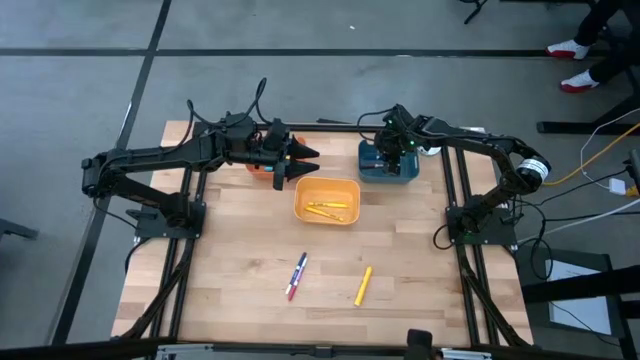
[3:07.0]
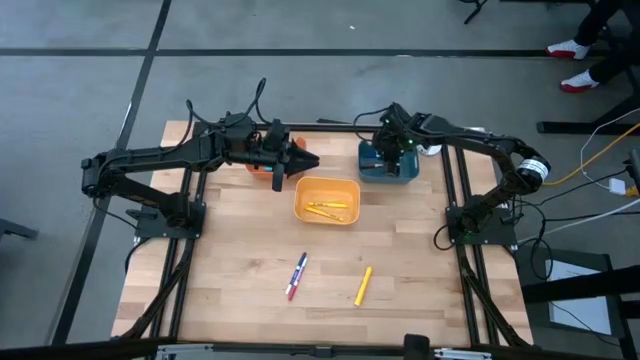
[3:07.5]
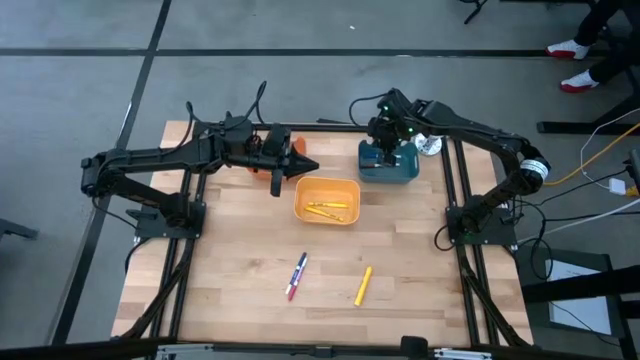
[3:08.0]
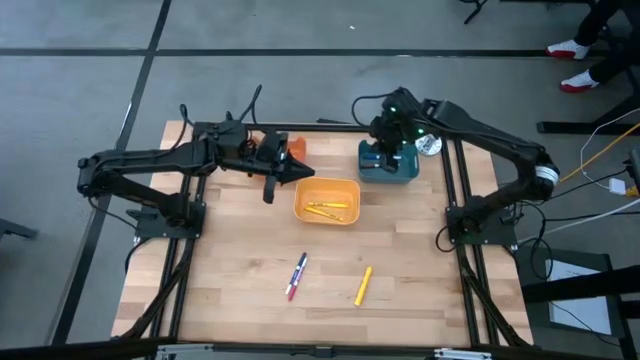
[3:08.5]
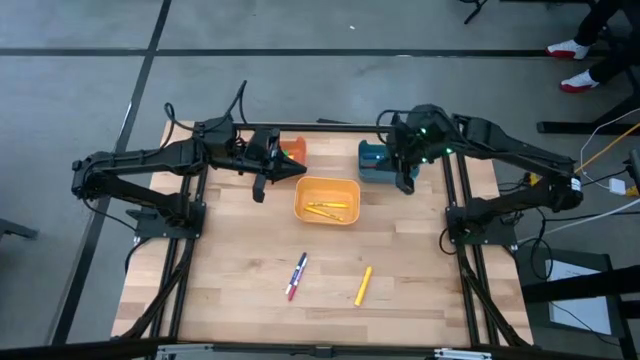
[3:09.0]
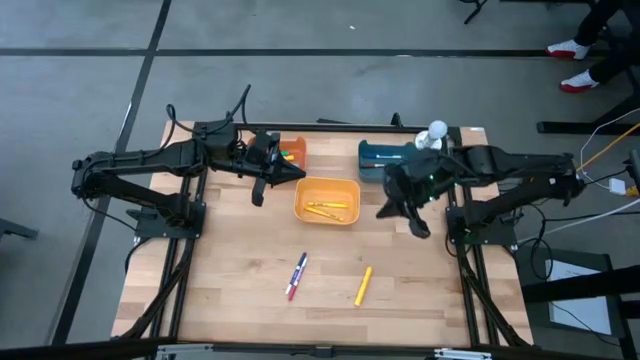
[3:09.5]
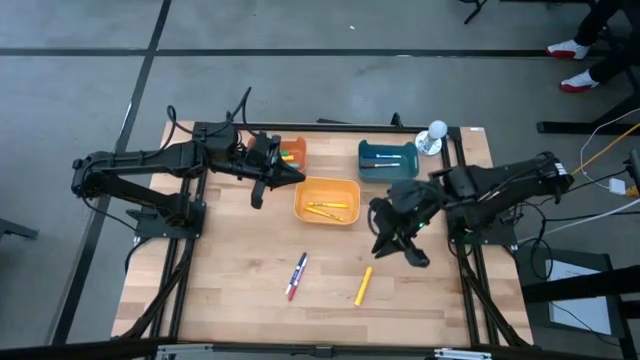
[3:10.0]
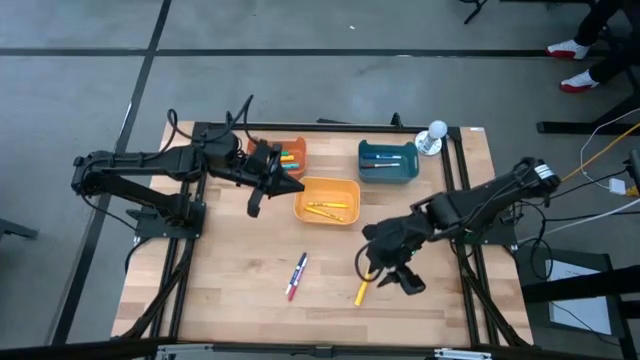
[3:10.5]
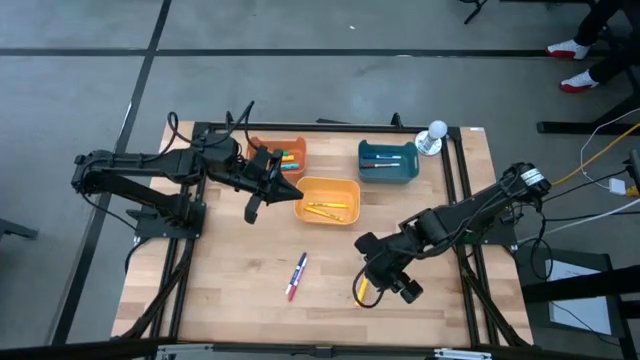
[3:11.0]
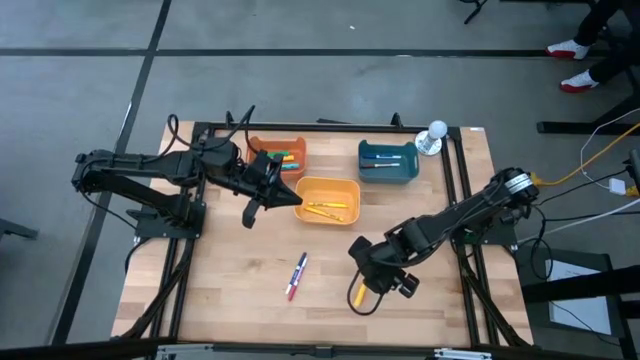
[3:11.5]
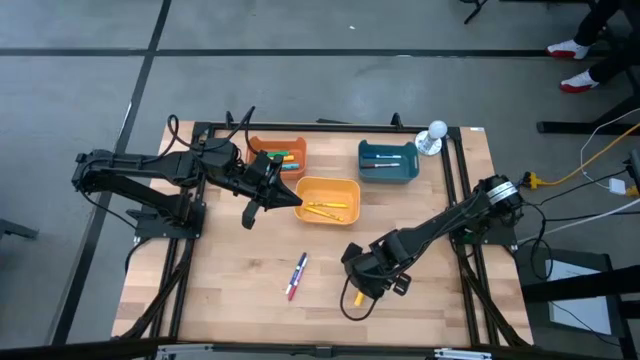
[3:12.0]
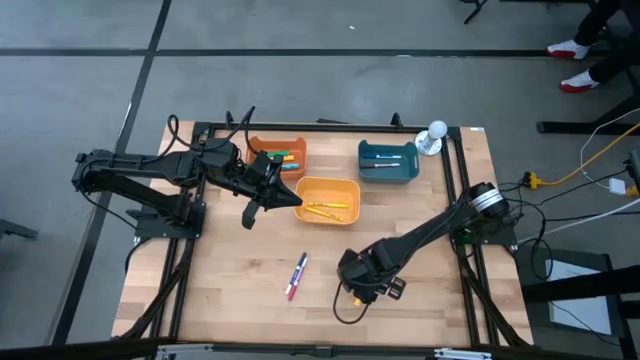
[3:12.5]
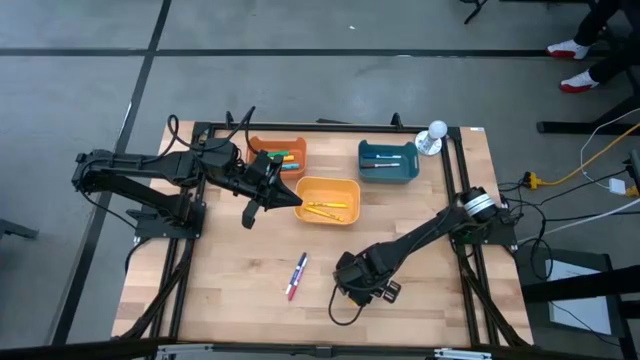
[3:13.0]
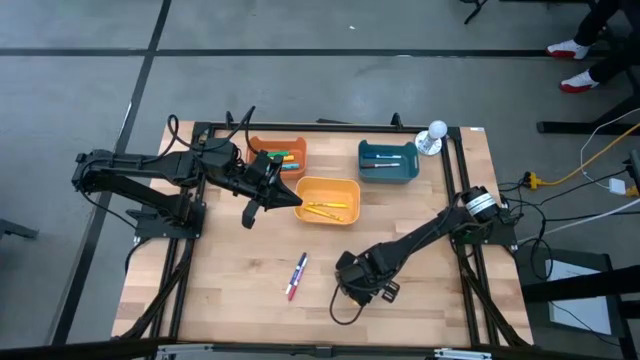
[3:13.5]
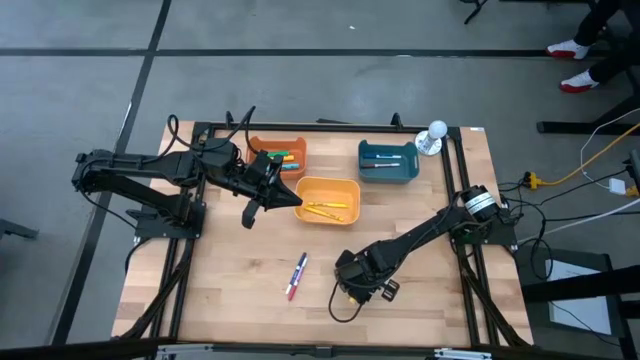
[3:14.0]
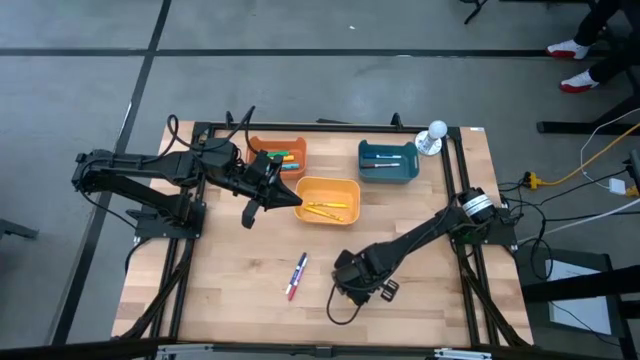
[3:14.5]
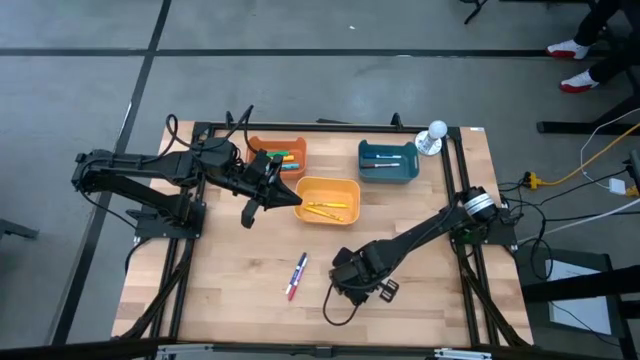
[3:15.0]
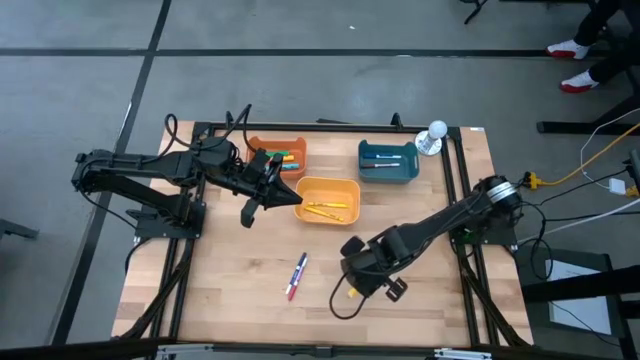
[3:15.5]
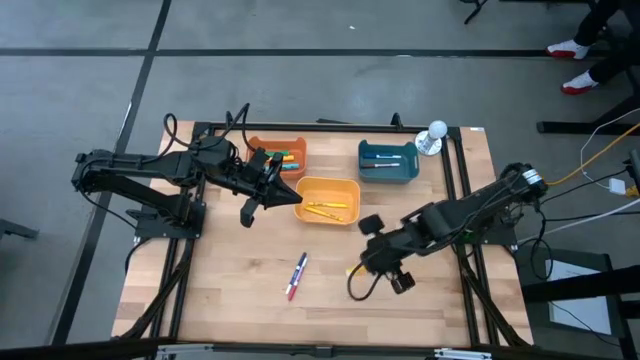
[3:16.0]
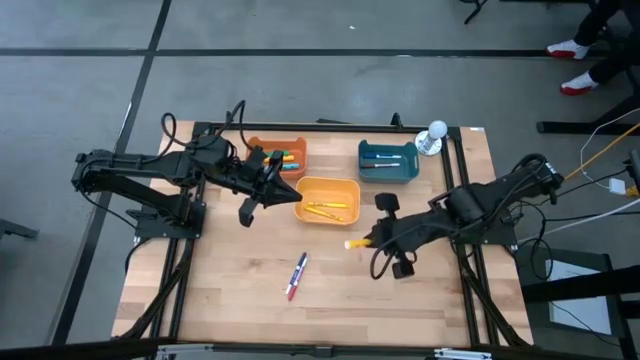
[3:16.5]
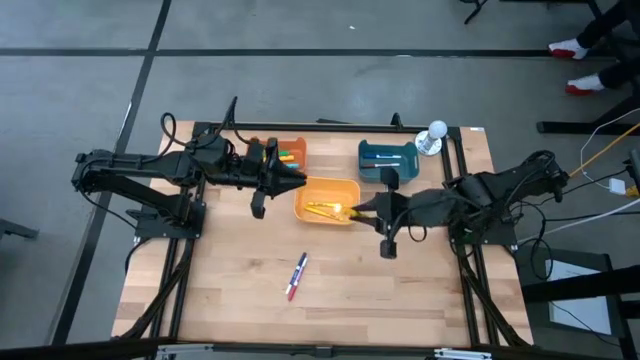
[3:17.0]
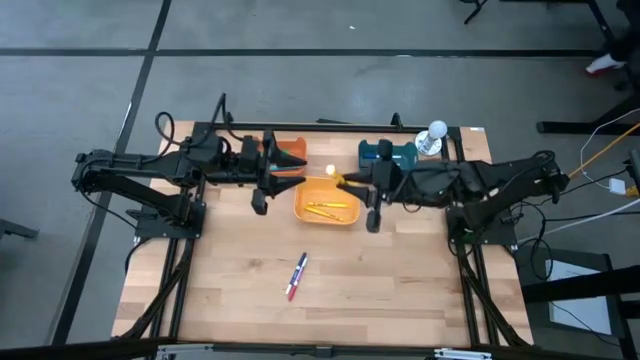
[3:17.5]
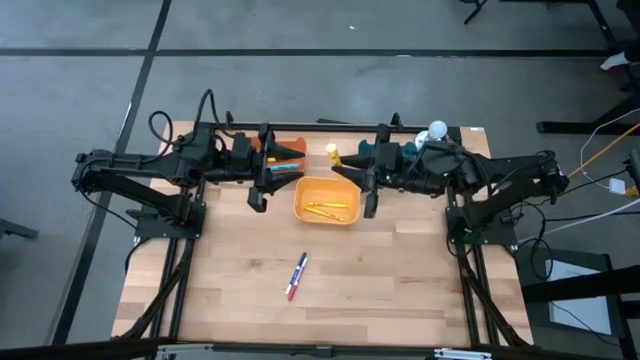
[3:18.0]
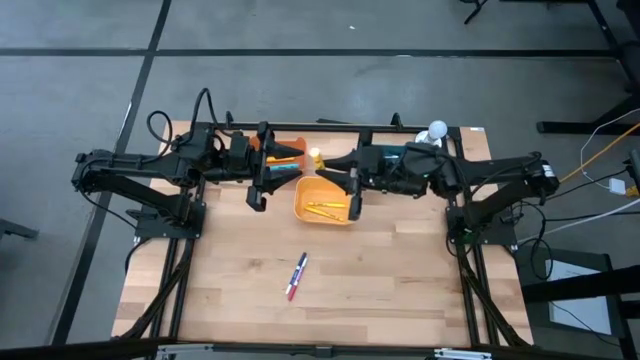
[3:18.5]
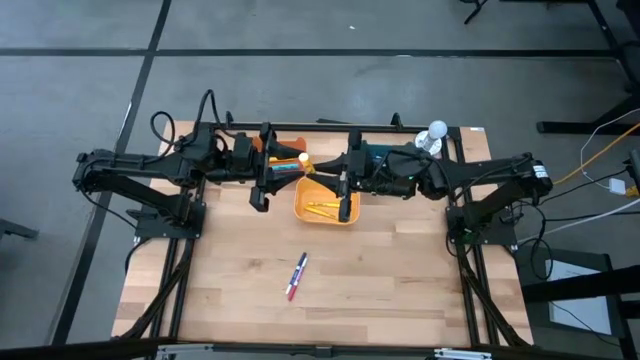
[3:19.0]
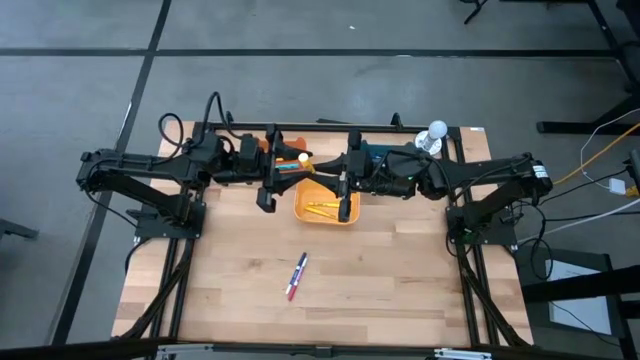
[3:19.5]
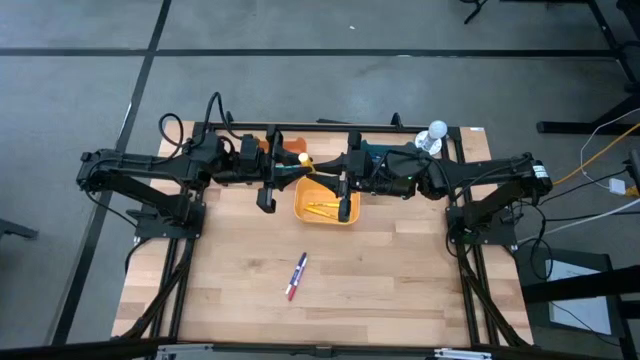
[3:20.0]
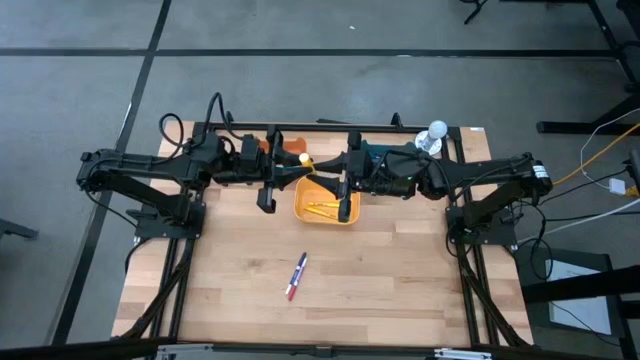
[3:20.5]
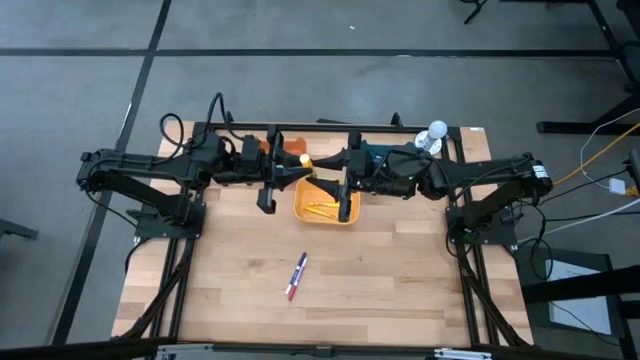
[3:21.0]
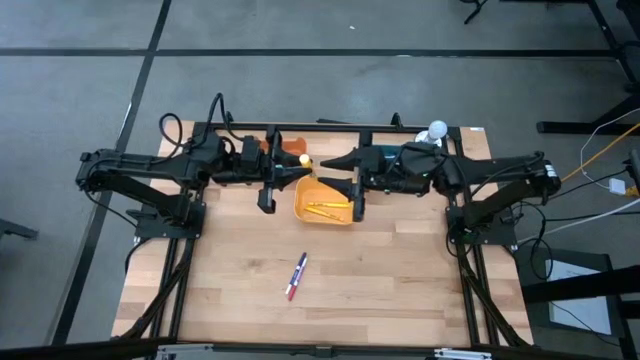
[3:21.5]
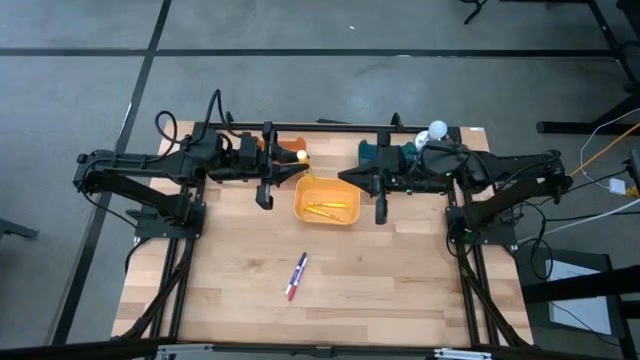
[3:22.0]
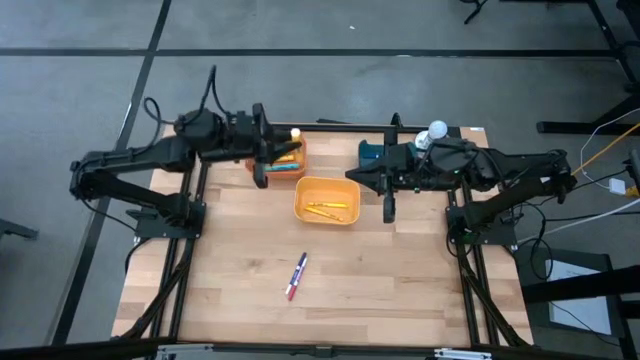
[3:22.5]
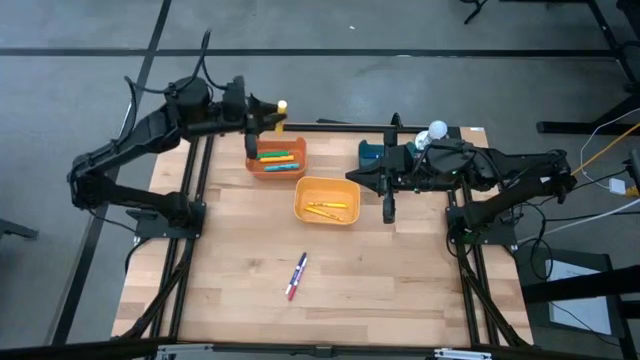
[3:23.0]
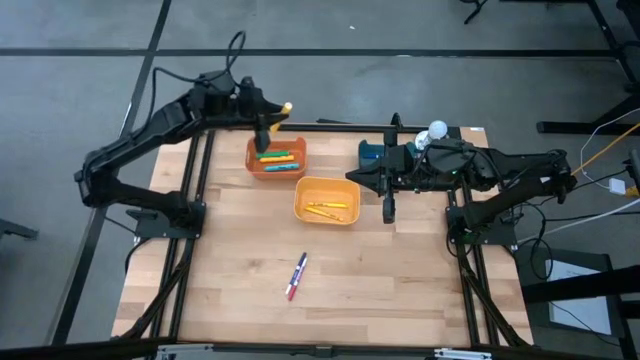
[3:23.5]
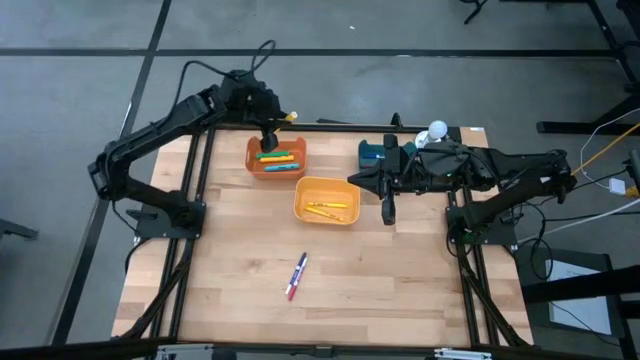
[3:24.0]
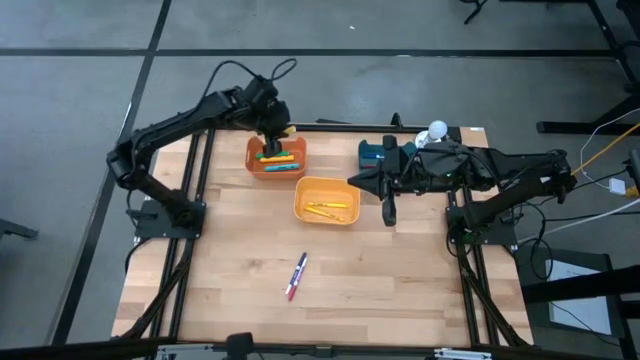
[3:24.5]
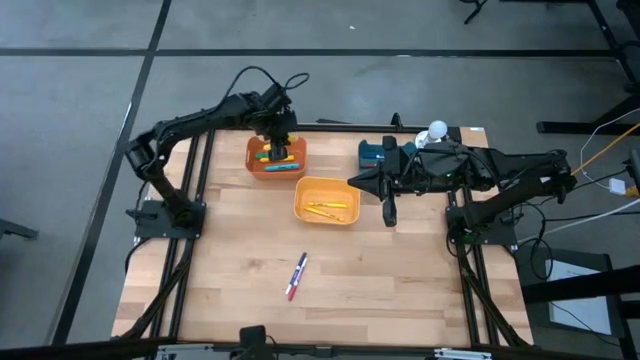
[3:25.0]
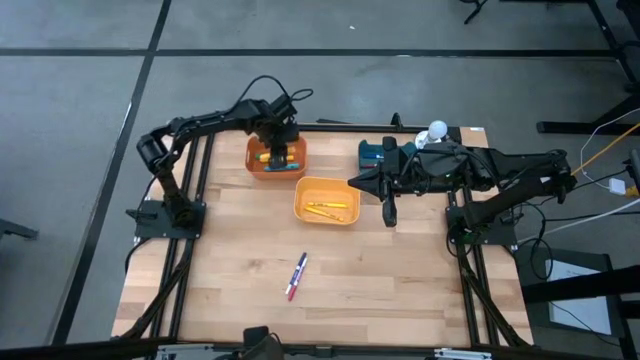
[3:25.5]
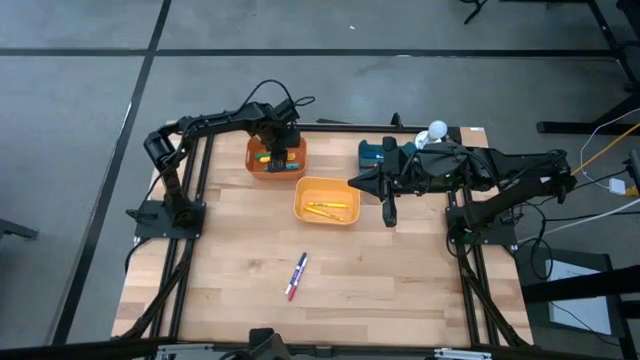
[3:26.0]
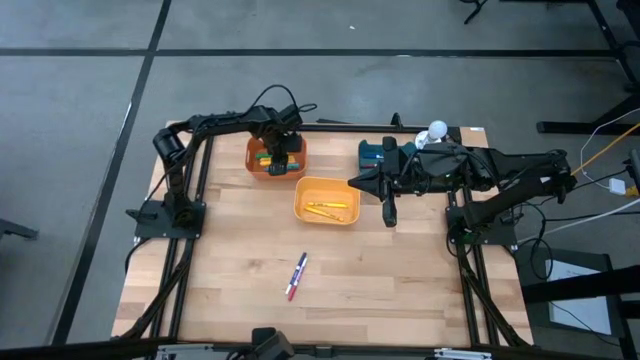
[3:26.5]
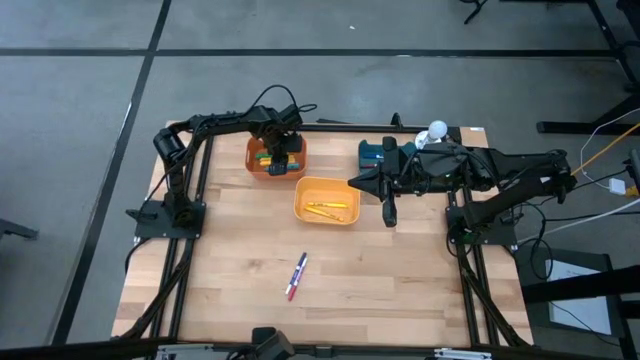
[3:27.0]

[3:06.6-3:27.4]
Task: Pick & Place Markers
Put the big yellow highlighter pen into the orange bin

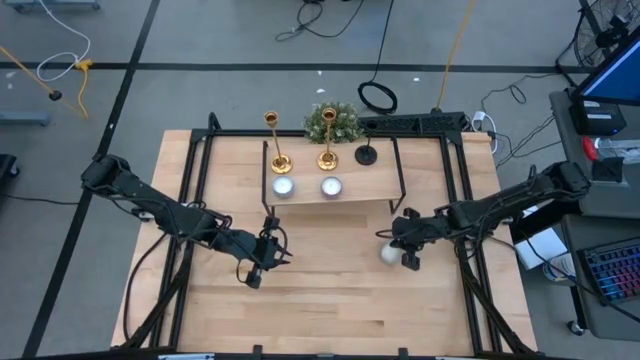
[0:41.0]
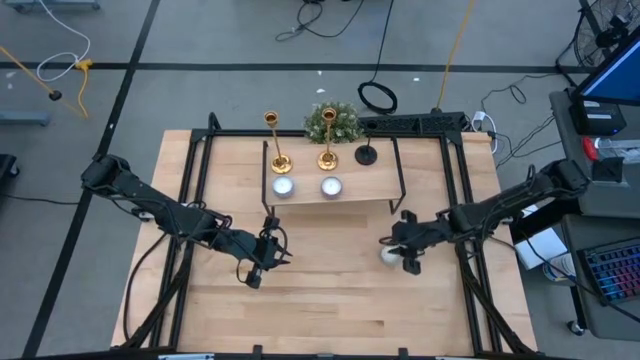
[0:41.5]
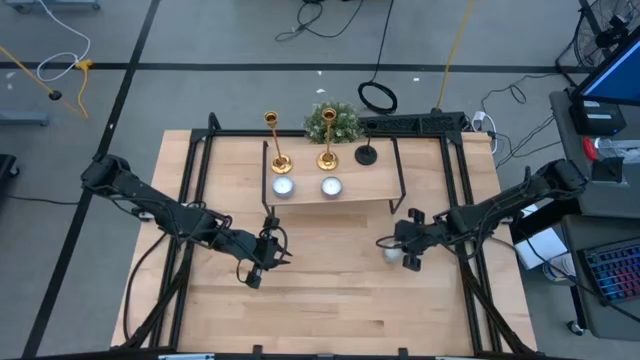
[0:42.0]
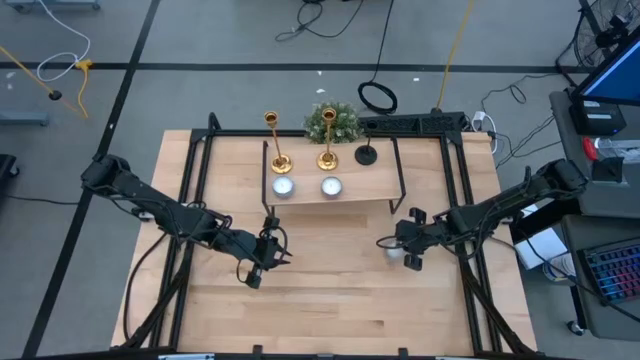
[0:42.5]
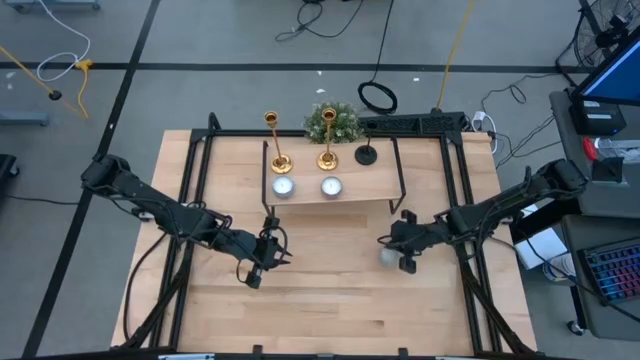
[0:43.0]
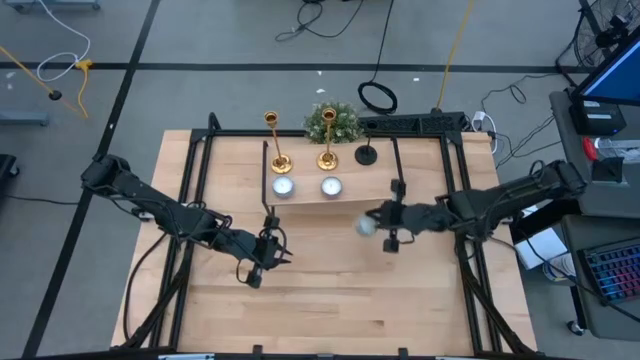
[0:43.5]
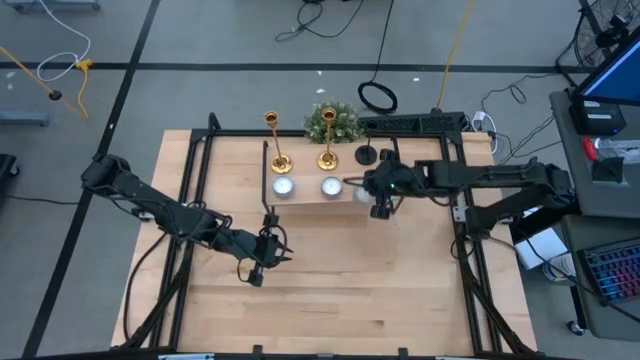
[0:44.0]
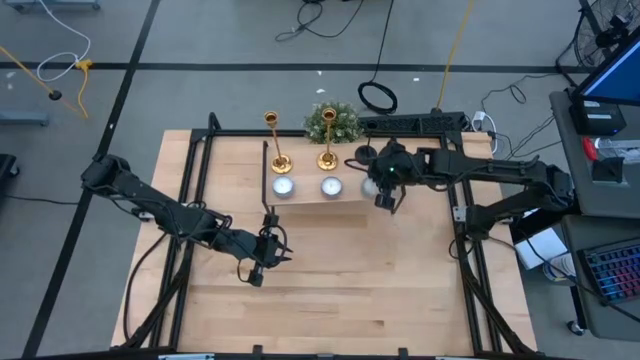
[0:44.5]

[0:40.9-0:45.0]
Task: Pick & Place candle stick holders
Align the blue scented candle with the pink scented candle on the shelf
